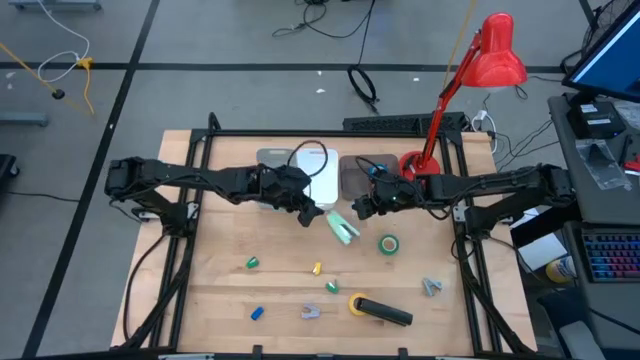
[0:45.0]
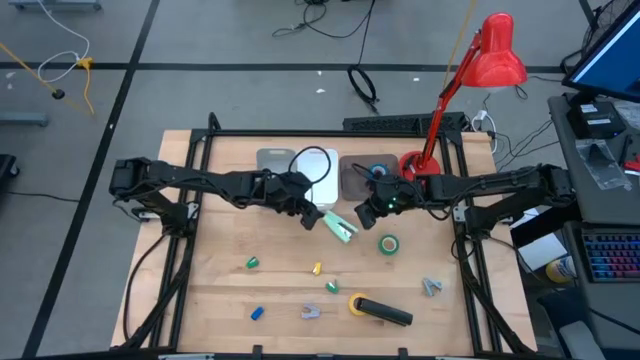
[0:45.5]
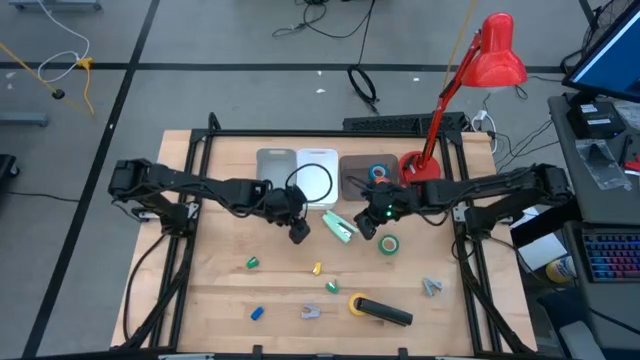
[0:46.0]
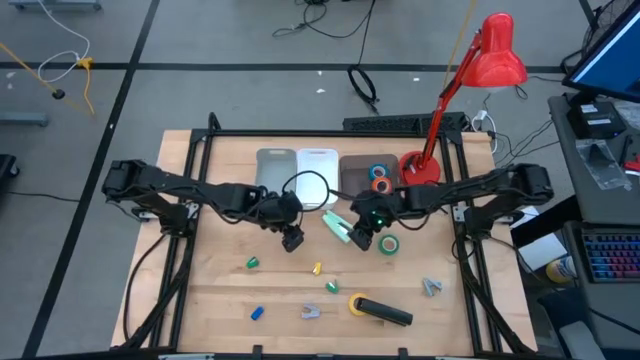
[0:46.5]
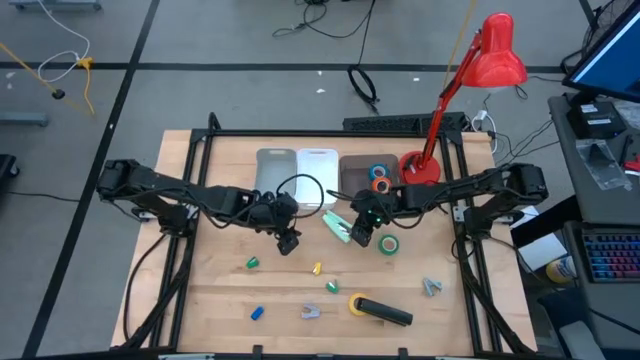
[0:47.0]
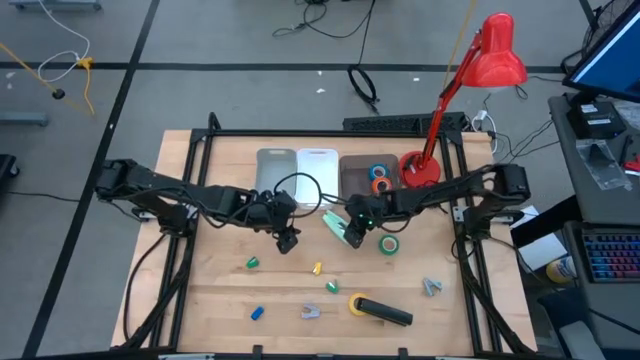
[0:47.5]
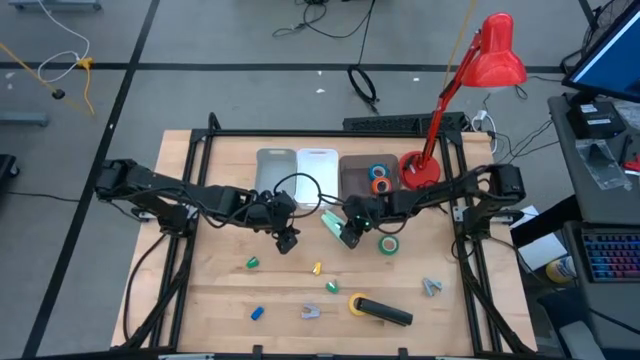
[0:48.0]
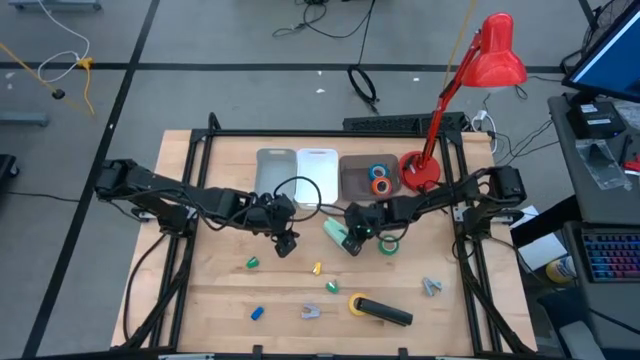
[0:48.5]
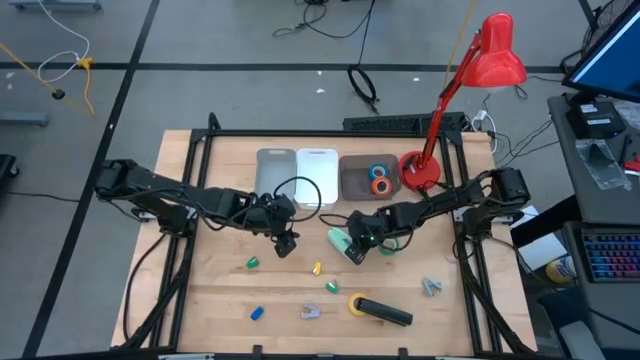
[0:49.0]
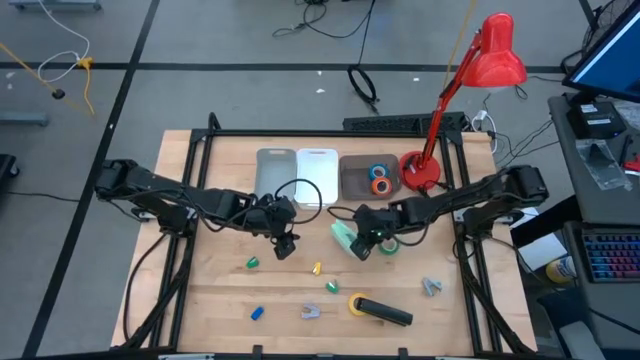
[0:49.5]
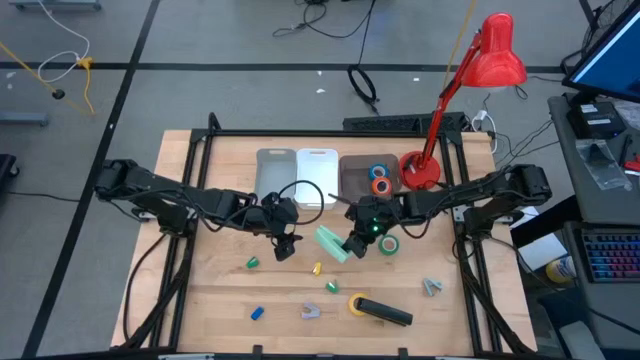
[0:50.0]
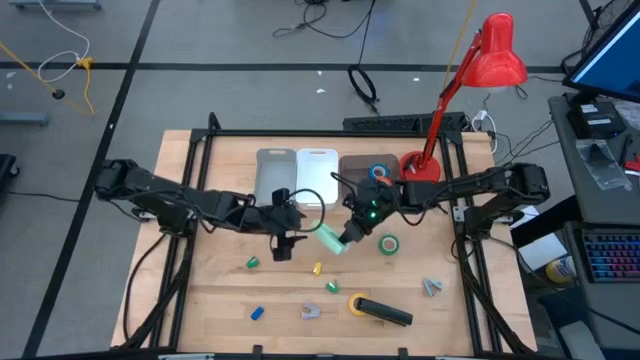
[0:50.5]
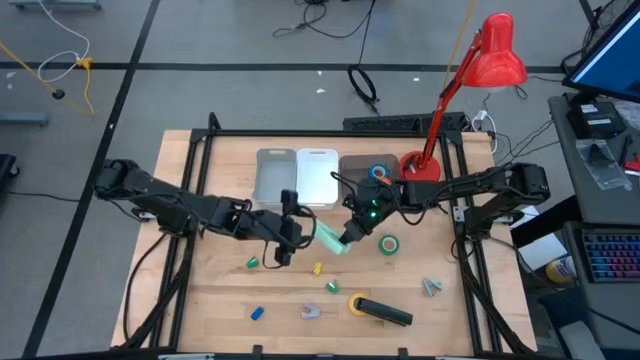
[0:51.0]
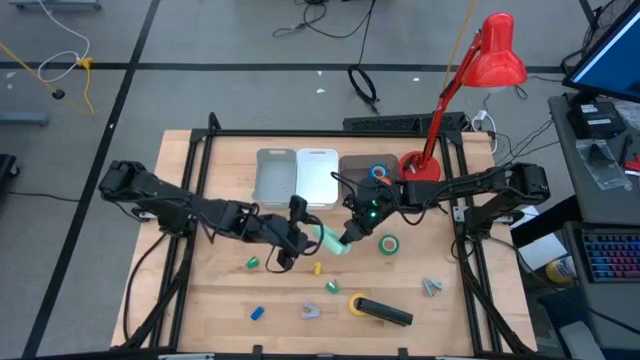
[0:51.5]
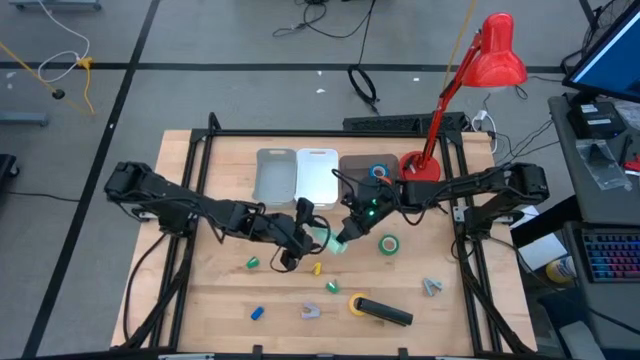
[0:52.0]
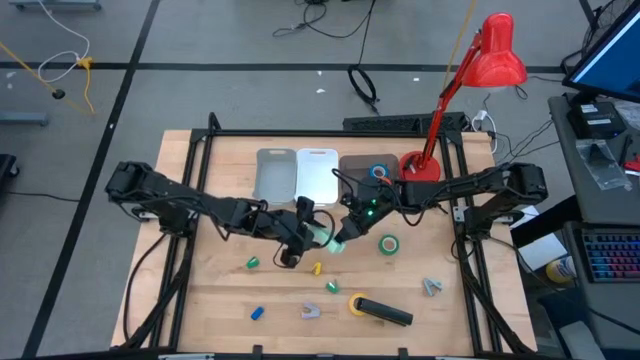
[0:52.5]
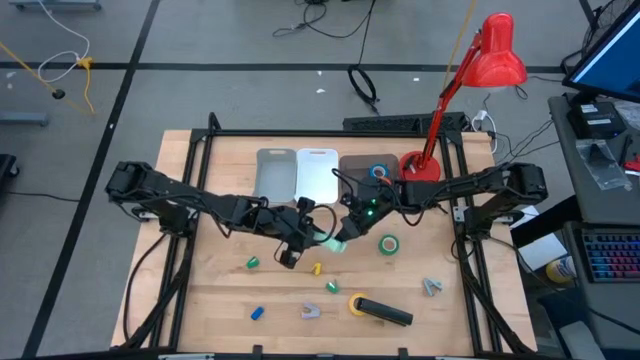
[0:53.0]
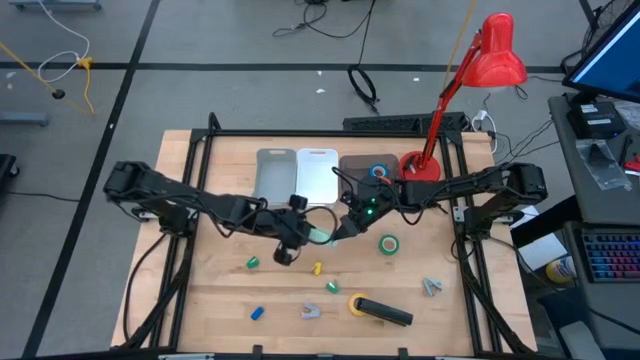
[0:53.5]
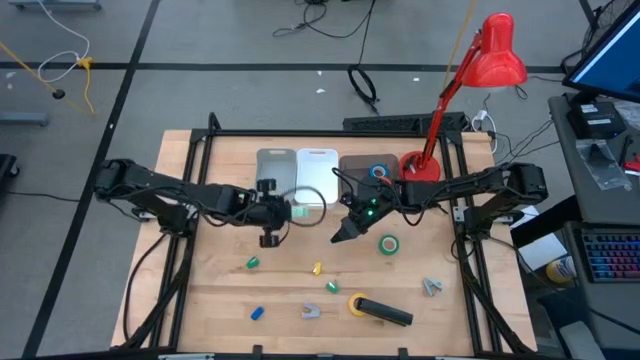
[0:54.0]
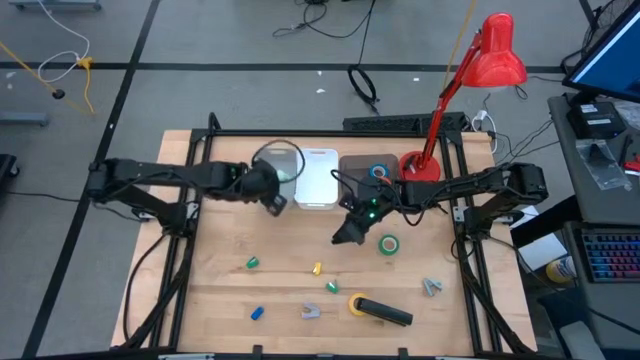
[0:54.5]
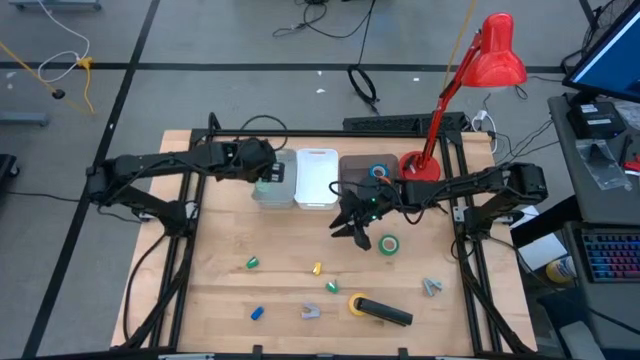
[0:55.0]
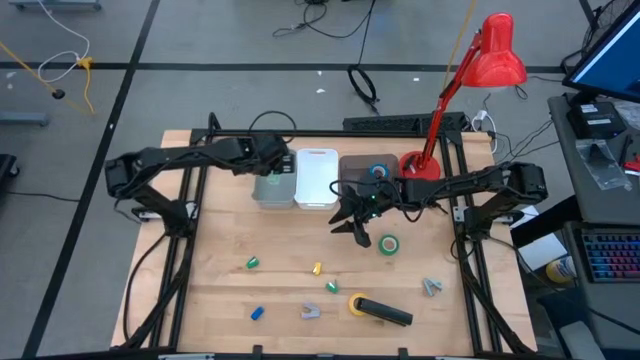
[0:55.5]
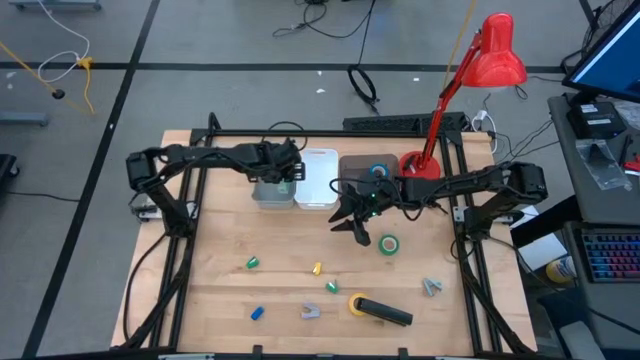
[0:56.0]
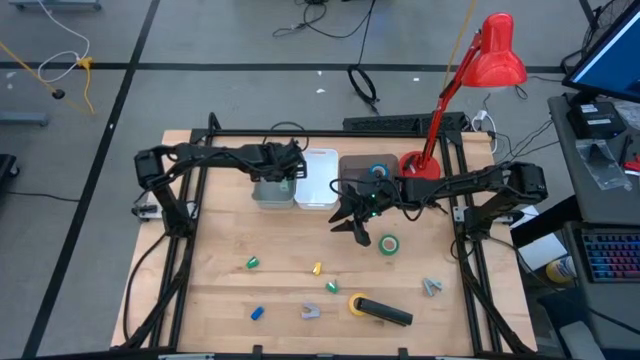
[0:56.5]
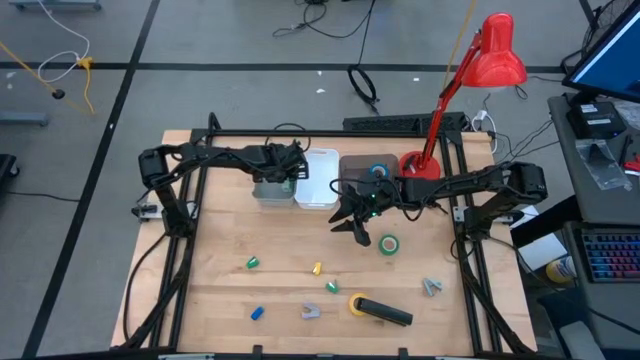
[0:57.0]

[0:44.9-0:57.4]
Task: Pick and place Stapler, Stapler remover, tape
Put the blue stapler into the grey bin

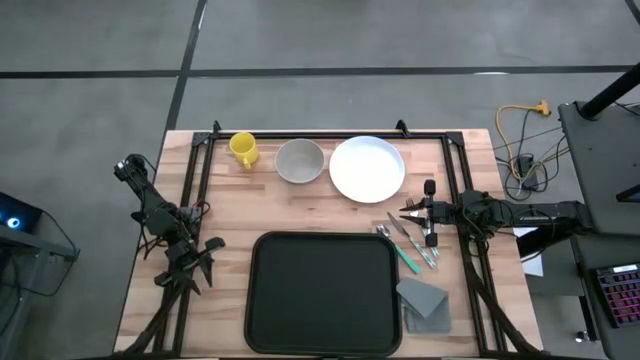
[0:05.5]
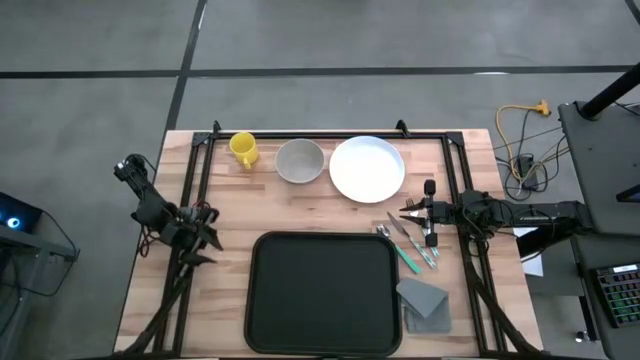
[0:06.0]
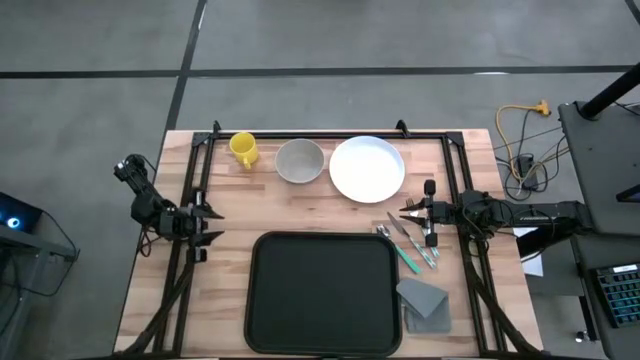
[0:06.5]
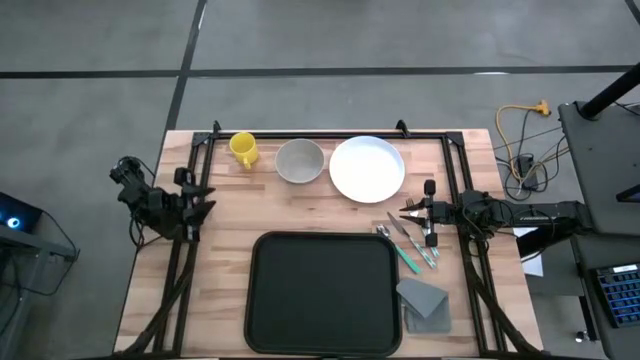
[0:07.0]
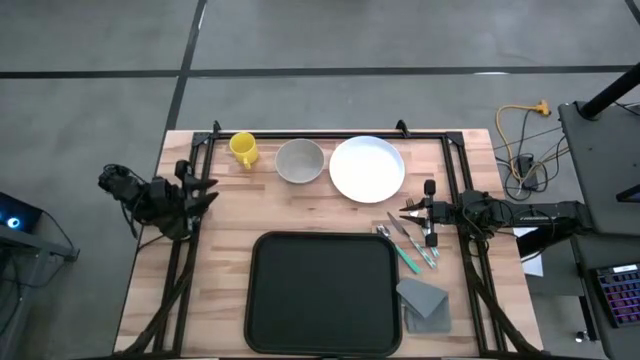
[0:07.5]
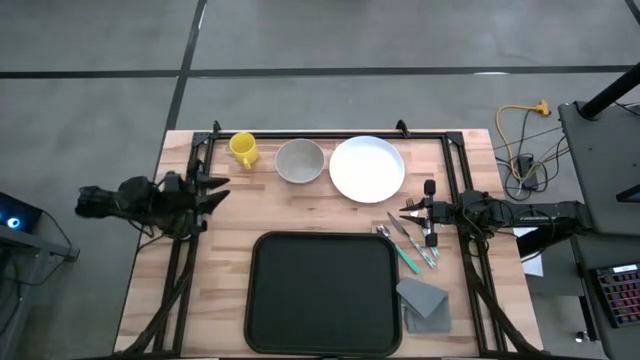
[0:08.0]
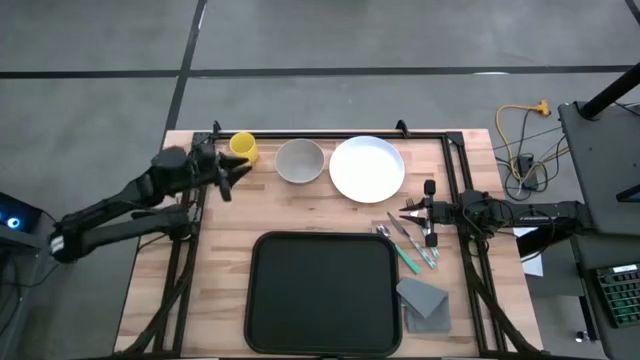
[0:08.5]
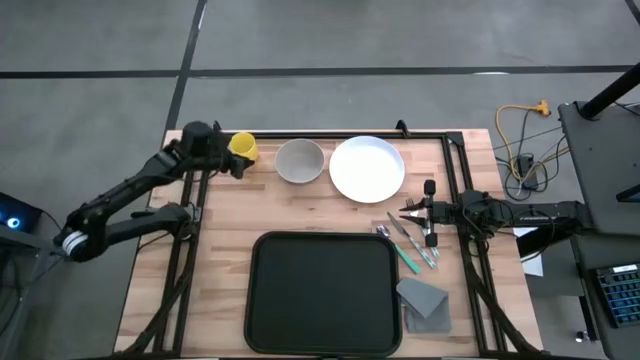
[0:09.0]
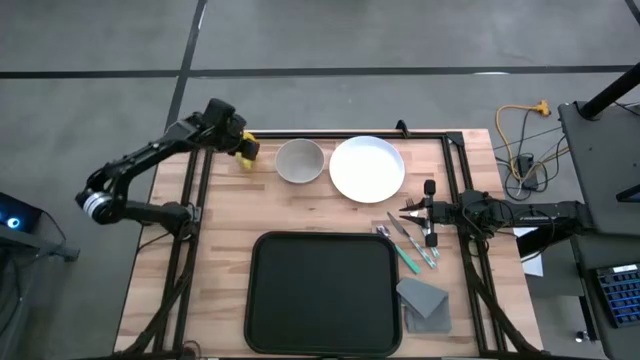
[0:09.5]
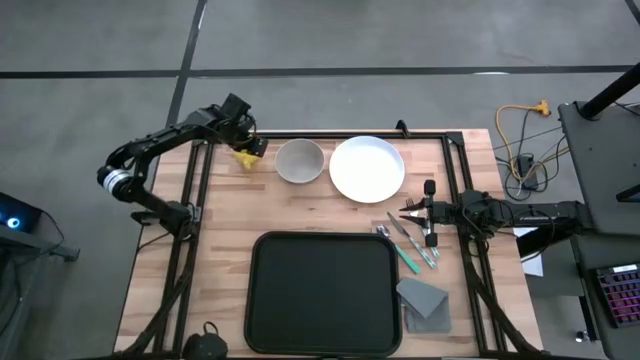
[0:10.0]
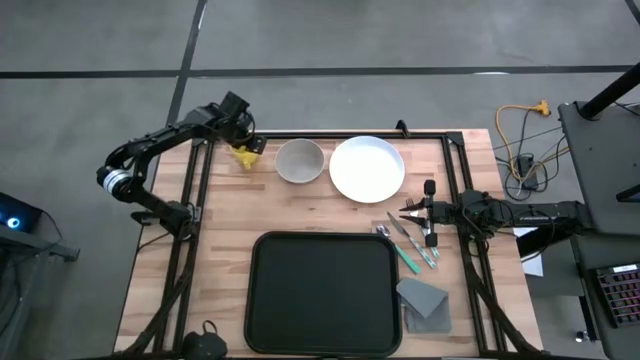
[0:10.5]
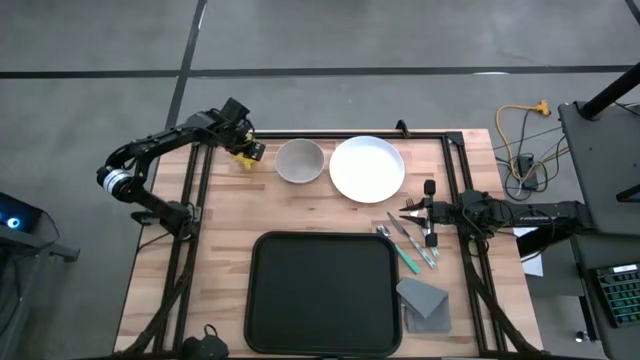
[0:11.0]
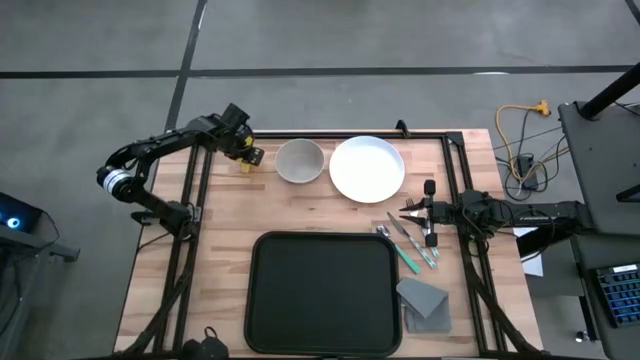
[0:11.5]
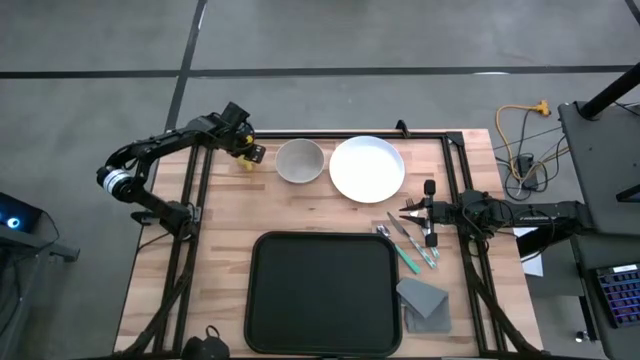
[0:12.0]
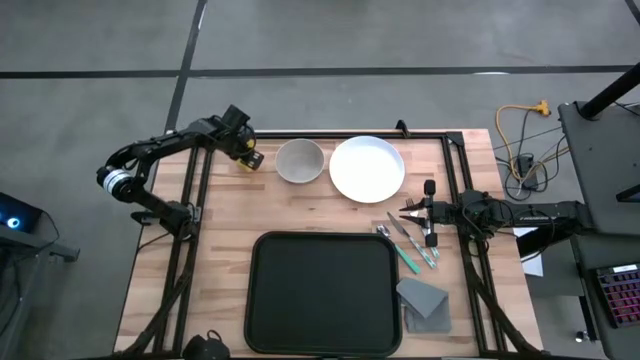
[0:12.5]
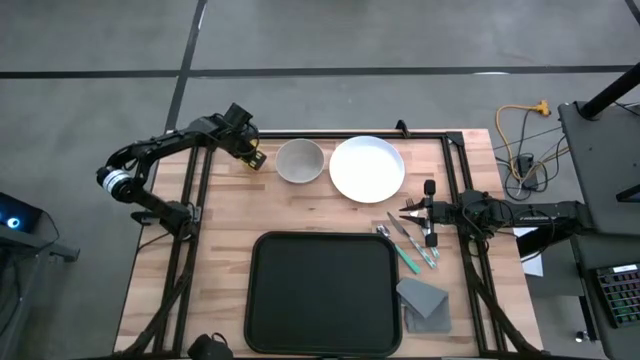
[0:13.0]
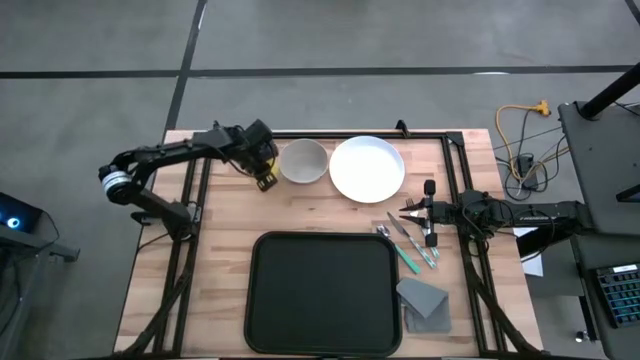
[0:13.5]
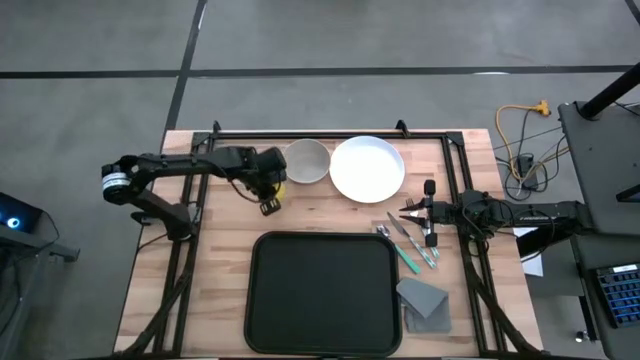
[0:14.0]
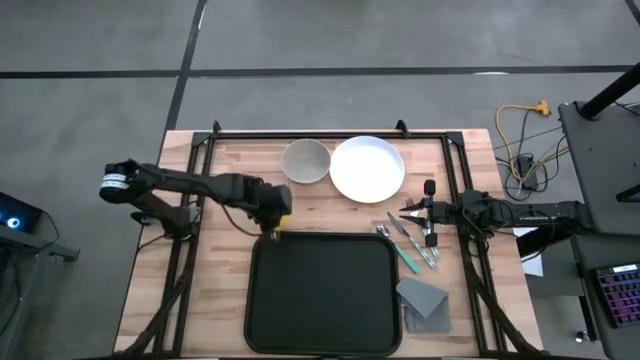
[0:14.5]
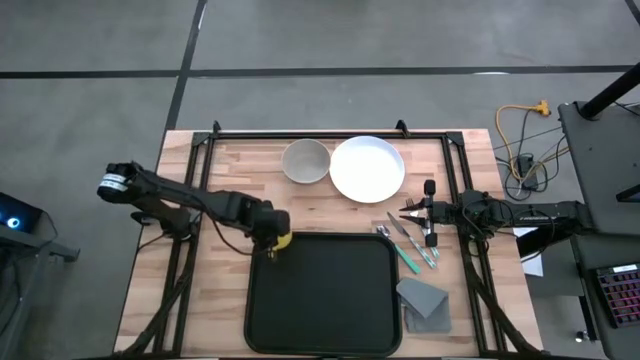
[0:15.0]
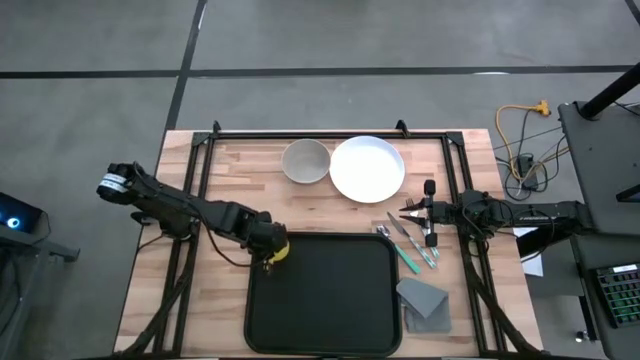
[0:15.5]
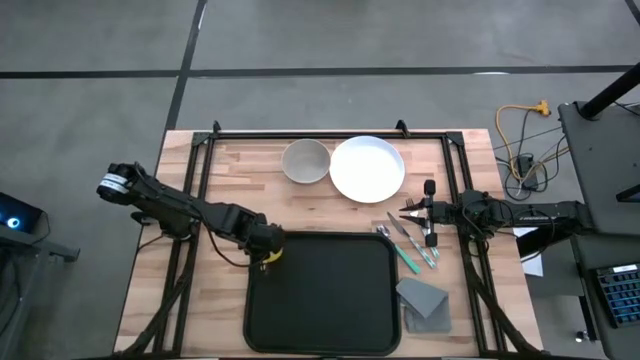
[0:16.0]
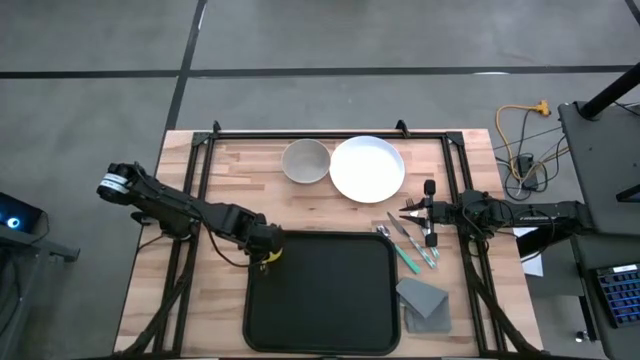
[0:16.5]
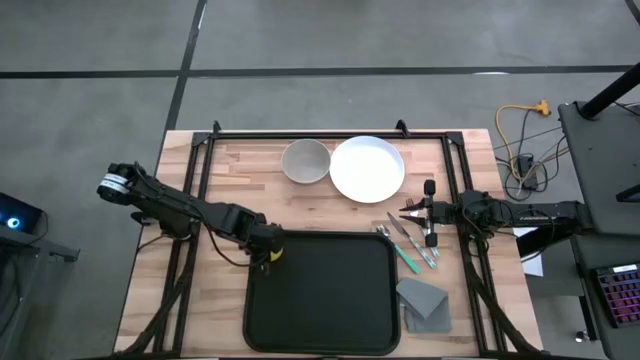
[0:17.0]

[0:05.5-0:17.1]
Task: Set up tray
Put the yellow mug on the top left of the black tray
